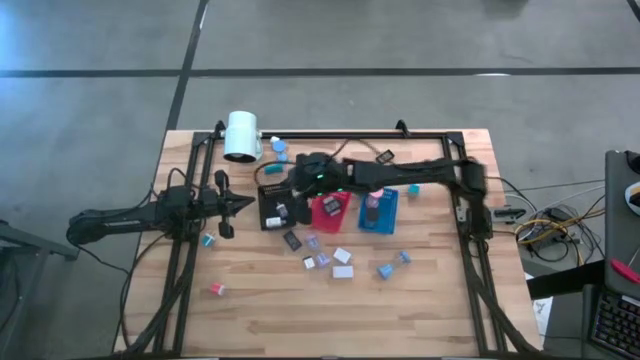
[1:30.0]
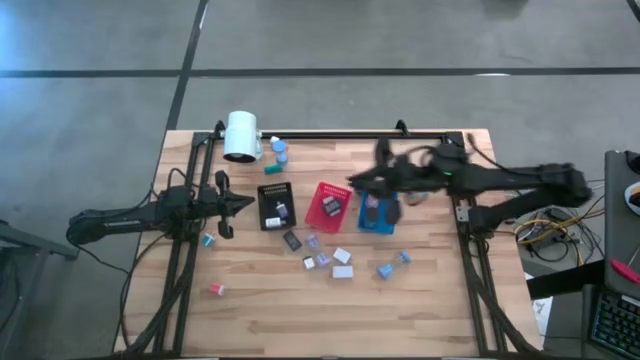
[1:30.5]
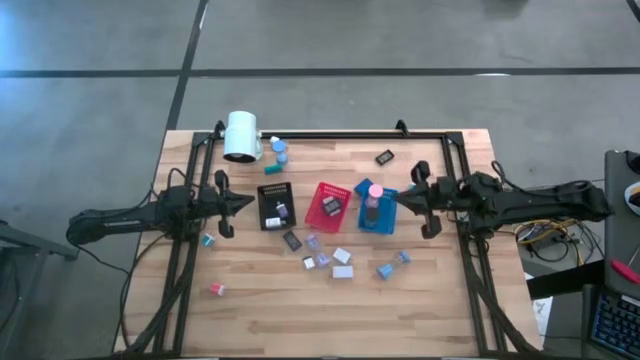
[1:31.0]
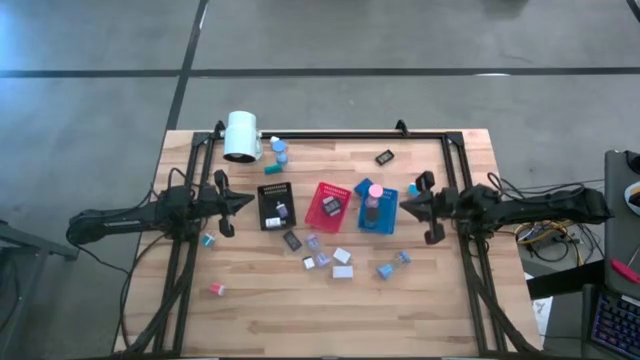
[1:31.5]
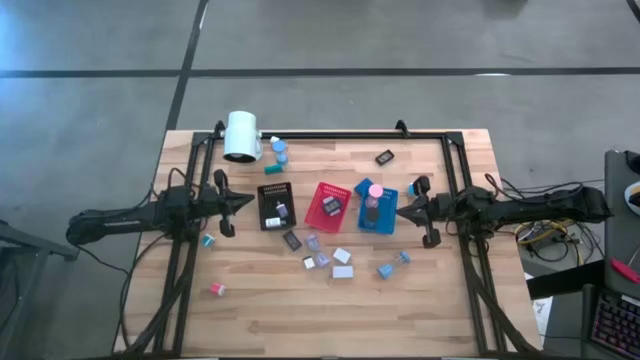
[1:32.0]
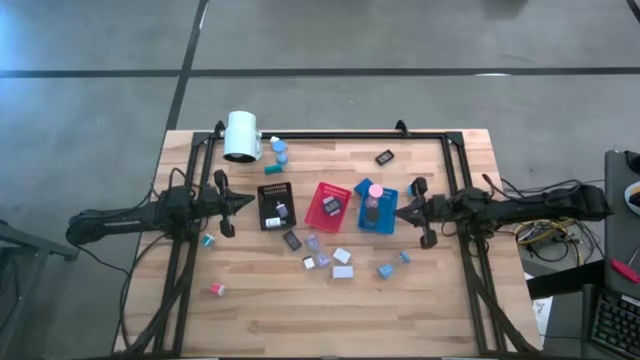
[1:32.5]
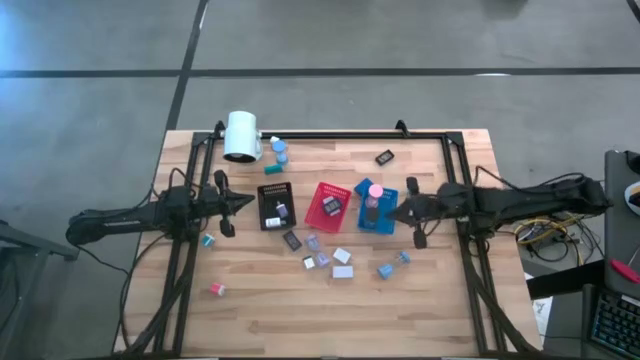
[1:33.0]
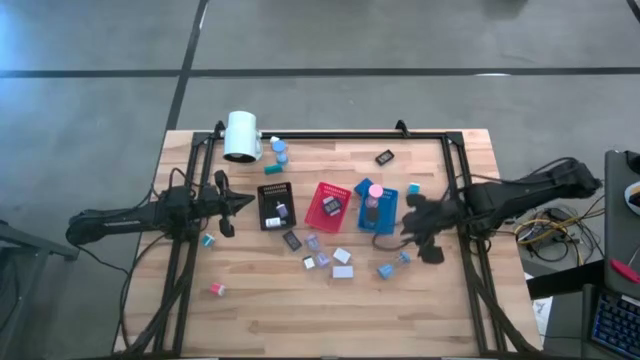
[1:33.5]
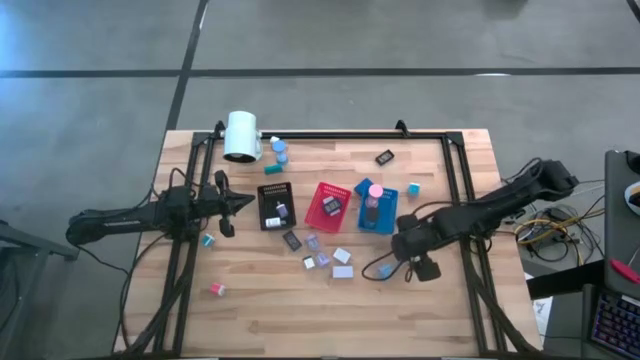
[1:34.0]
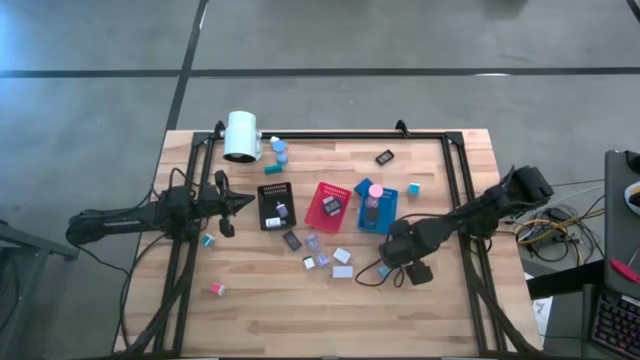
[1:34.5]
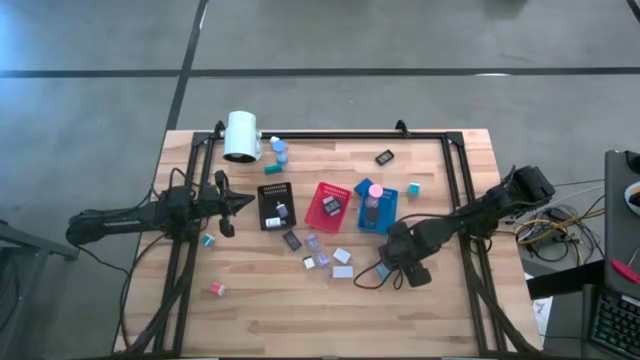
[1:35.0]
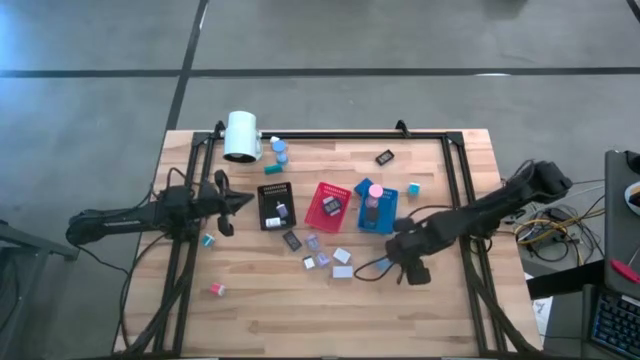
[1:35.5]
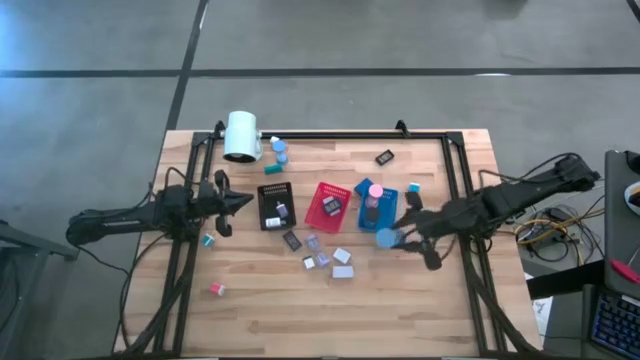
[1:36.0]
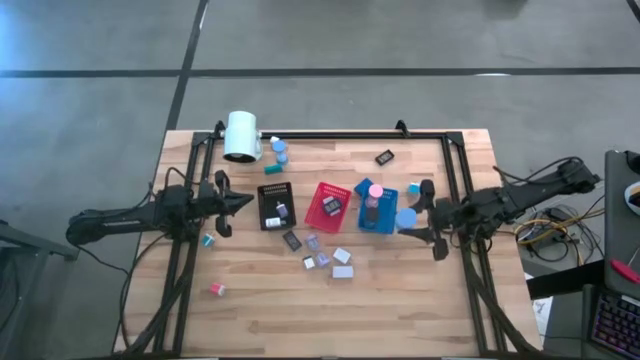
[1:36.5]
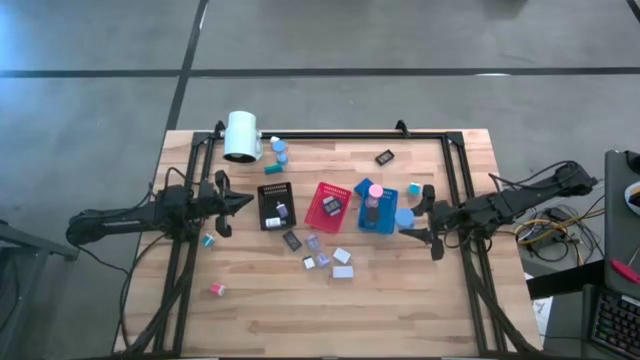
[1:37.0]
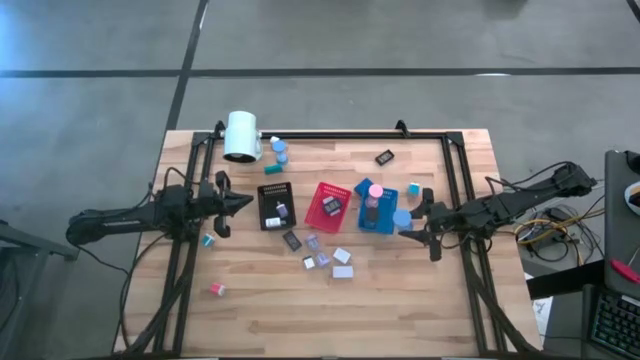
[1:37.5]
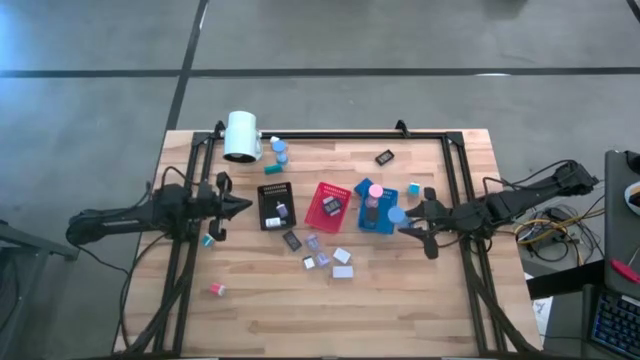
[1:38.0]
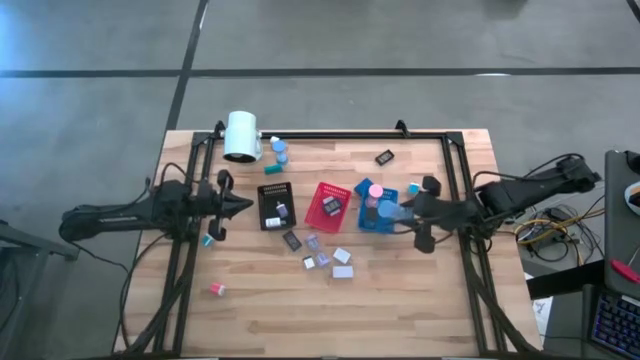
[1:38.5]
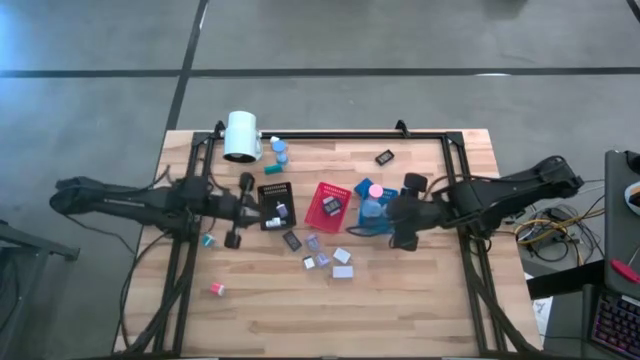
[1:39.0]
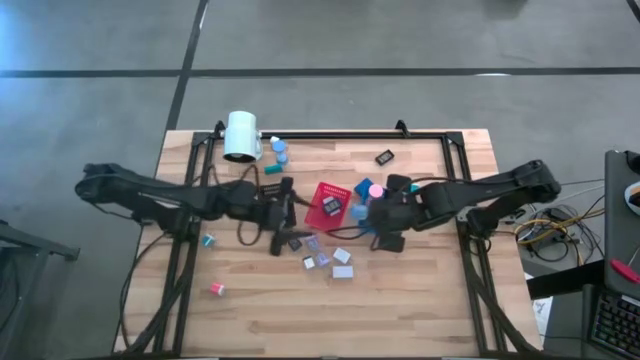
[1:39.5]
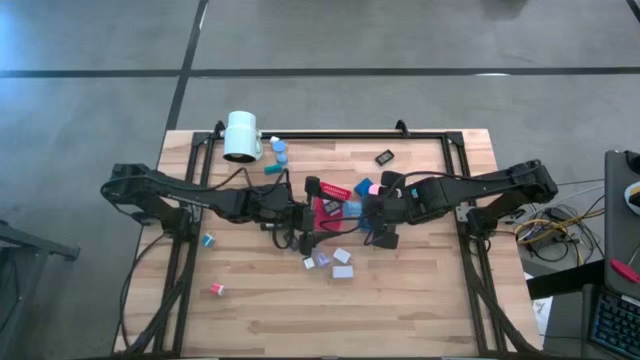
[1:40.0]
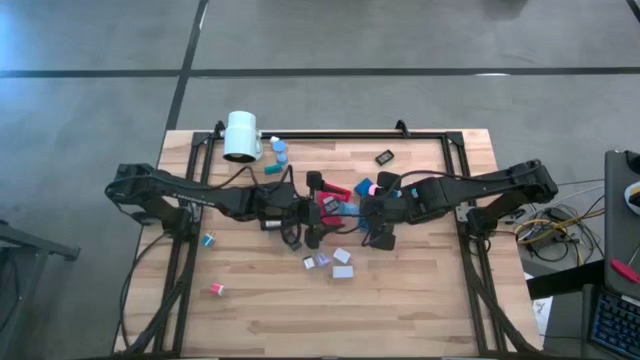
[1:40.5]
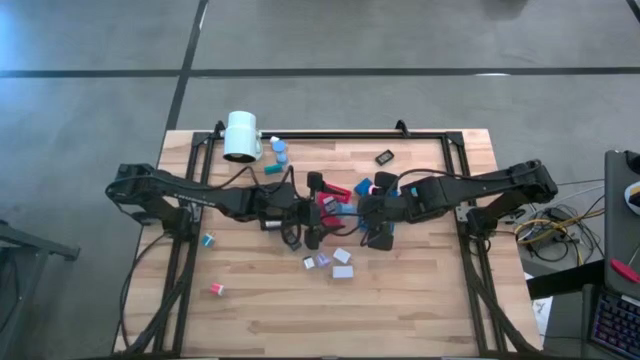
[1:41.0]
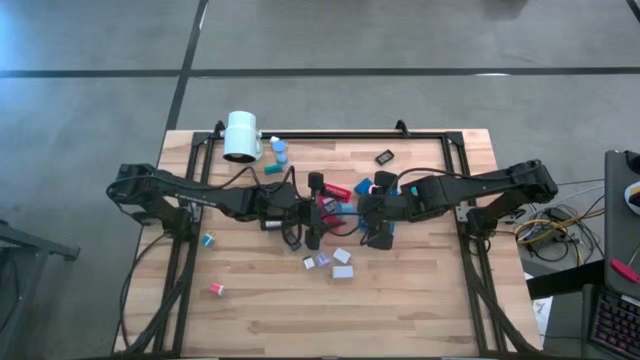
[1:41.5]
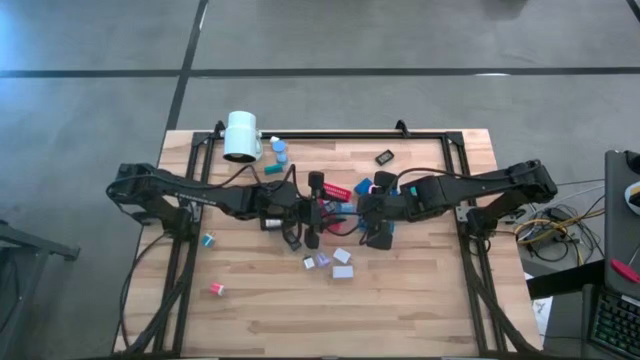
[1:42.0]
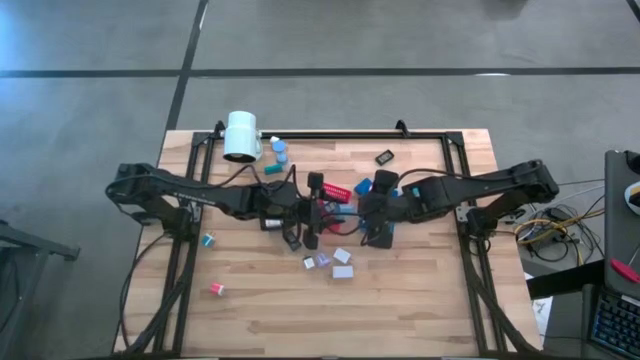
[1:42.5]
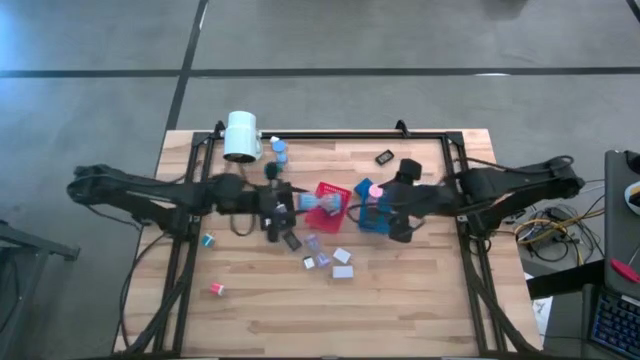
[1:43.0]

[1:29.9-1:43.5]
Task: Pick & Place Office items
Put the bottom blue hourglass into the blue bin

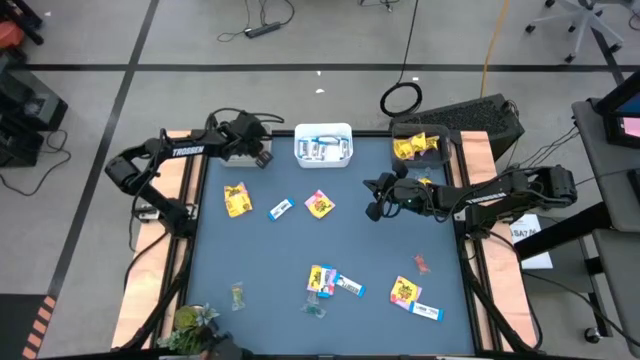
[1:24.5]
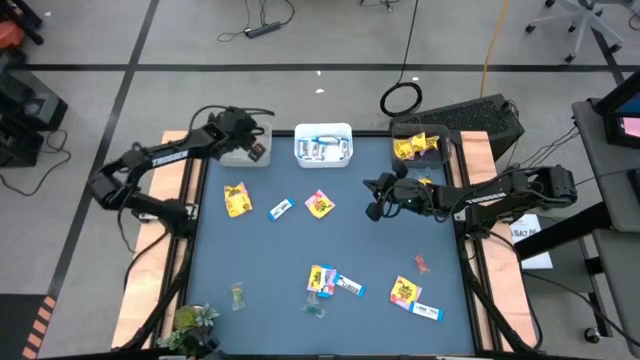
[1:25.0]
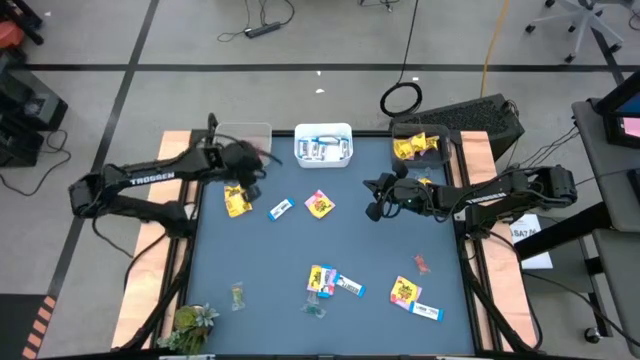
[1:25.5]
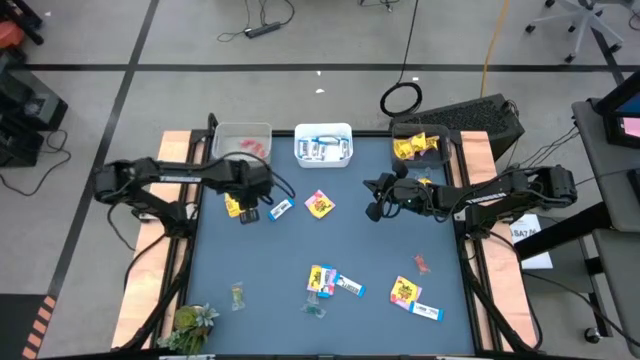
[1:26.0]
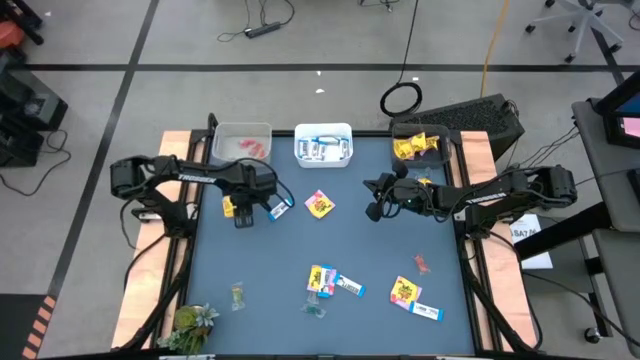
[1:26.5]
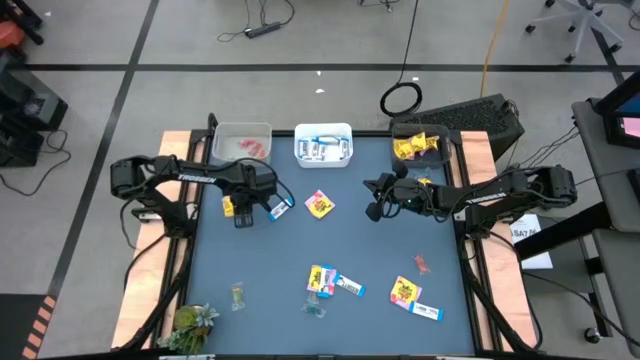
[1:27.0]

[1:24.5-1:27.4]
Task: Sort candy
Put the yellow candy into the black bin

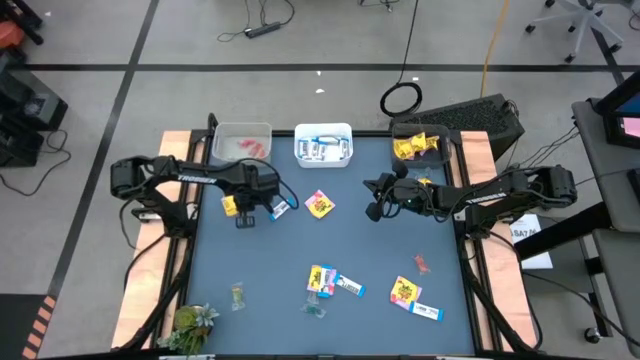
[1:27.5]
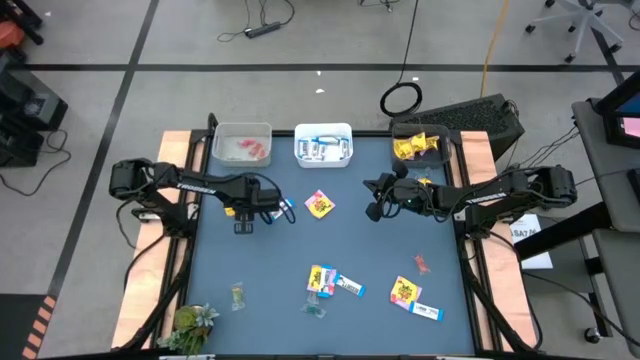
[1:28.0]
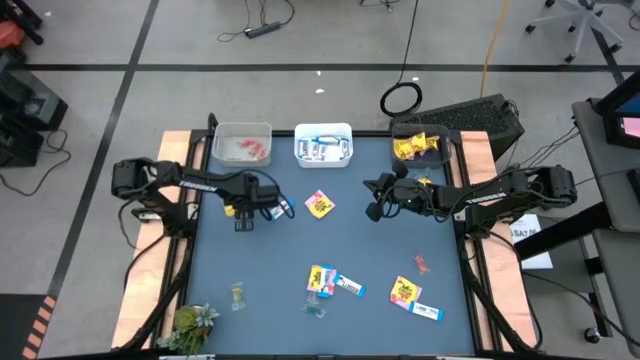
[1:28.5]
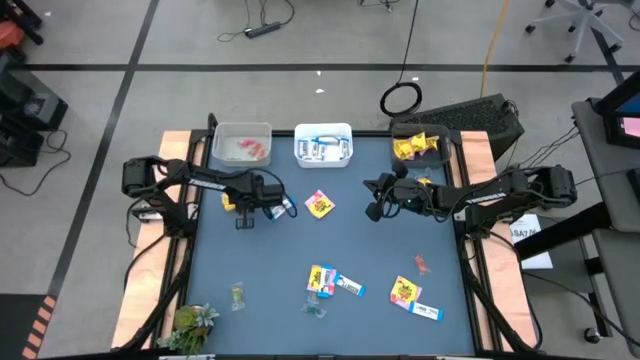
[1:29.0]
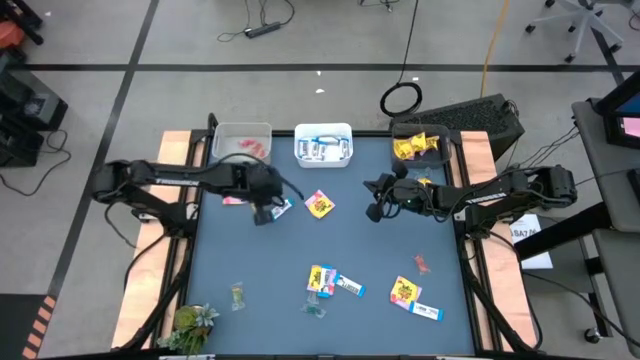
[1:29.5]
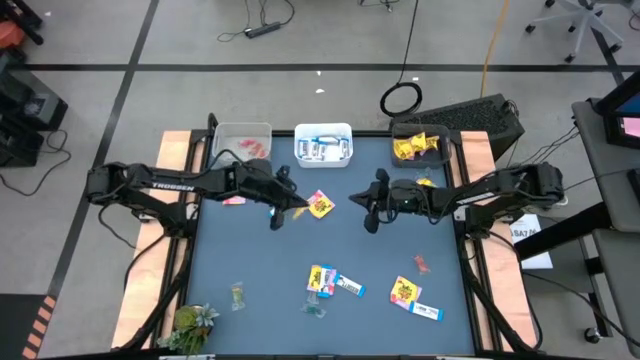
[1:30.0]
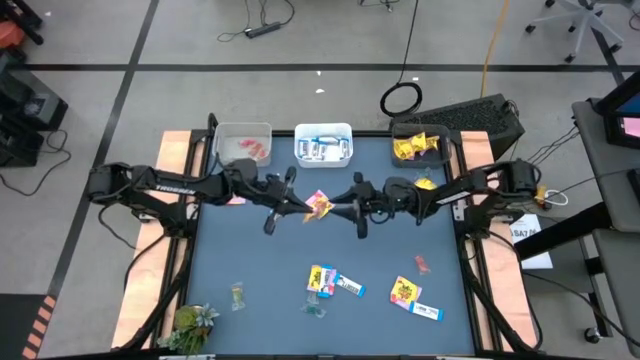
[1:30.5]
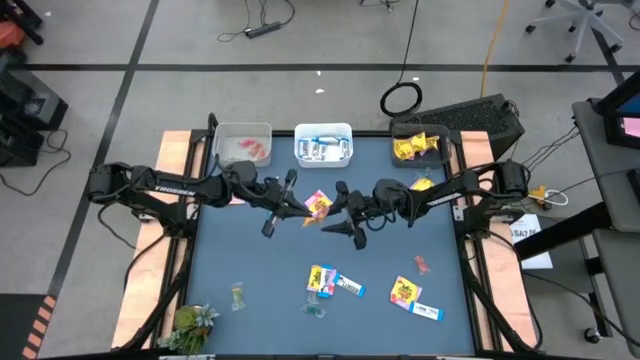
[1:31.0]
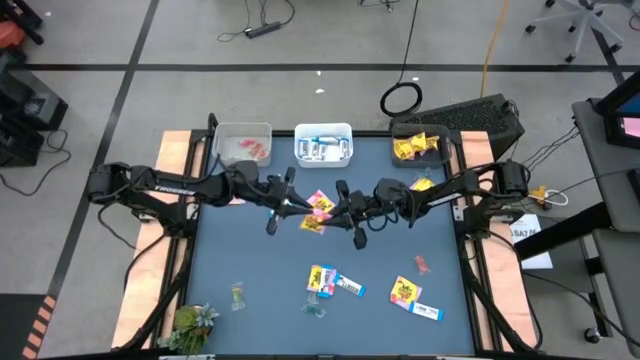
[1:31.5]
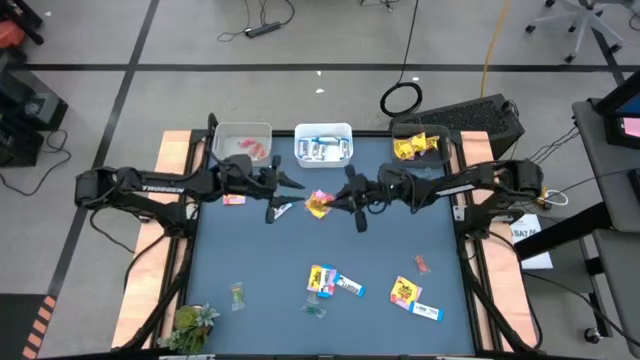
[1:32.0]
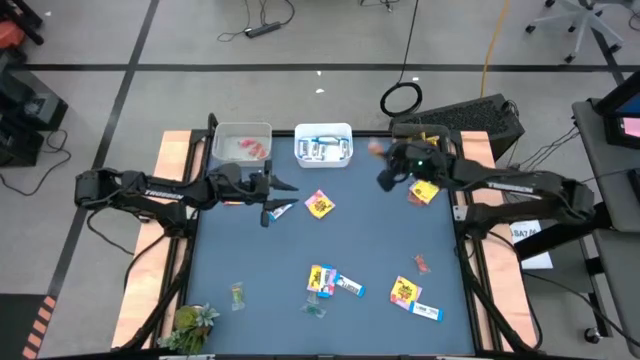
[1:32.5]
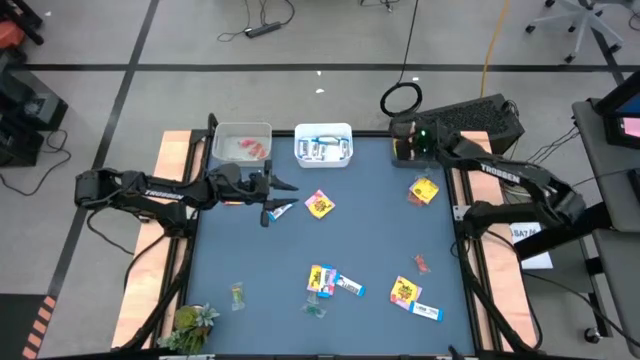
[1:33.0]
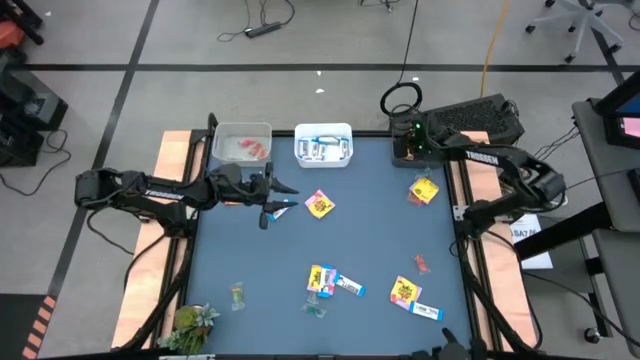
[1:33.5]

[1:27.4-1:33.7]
Put the yellow candy into the black bin
